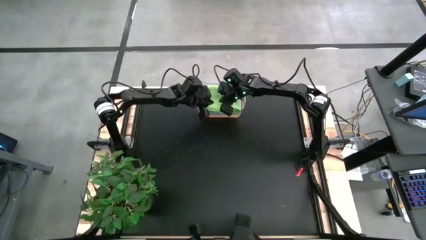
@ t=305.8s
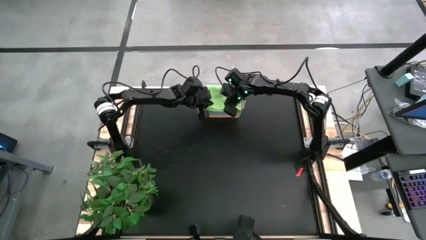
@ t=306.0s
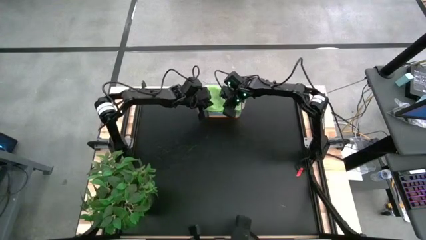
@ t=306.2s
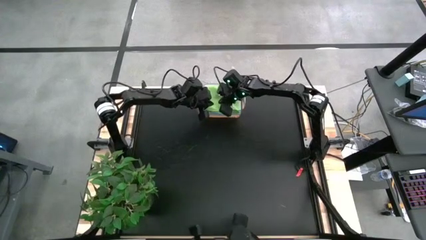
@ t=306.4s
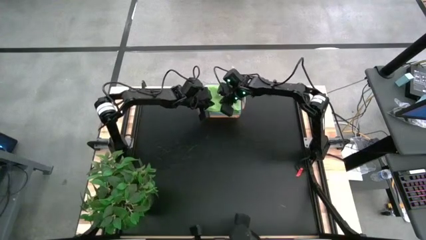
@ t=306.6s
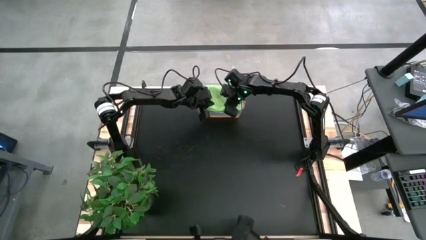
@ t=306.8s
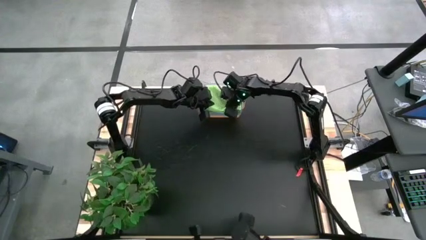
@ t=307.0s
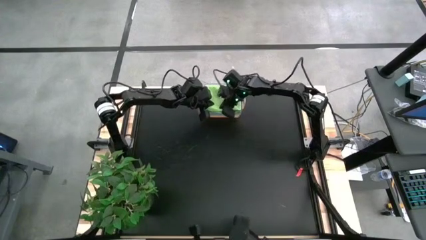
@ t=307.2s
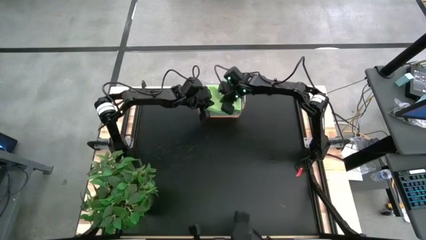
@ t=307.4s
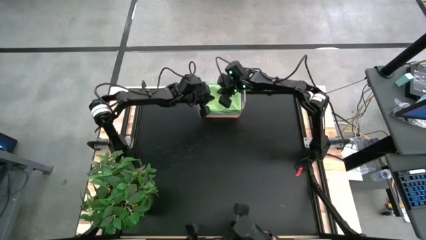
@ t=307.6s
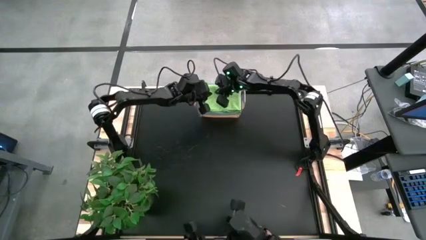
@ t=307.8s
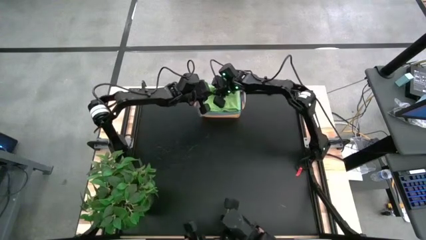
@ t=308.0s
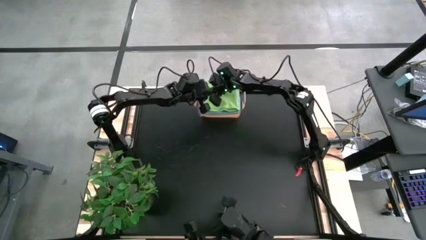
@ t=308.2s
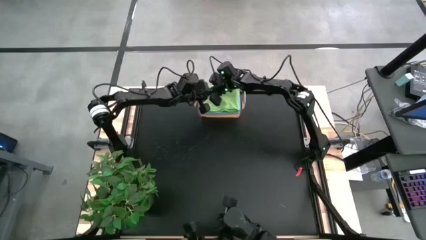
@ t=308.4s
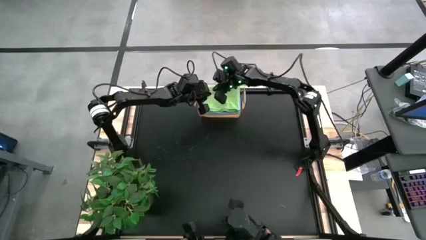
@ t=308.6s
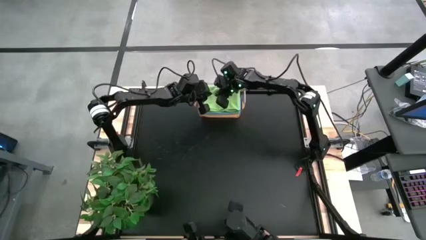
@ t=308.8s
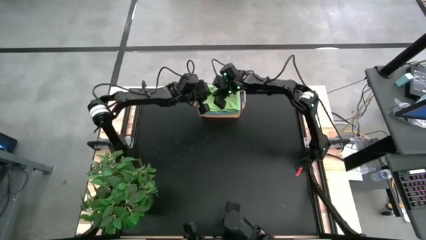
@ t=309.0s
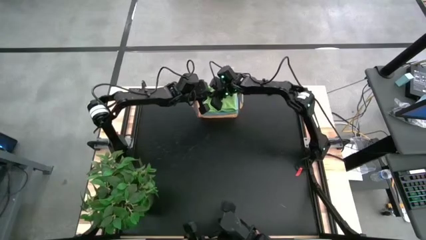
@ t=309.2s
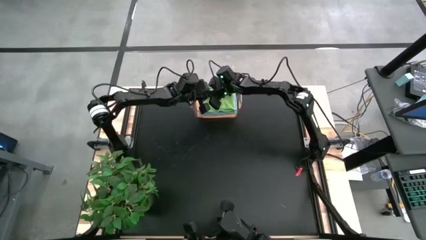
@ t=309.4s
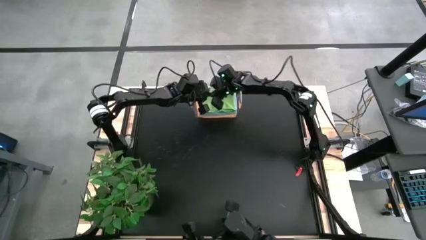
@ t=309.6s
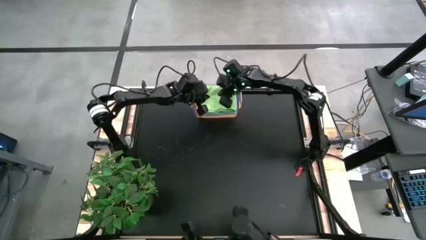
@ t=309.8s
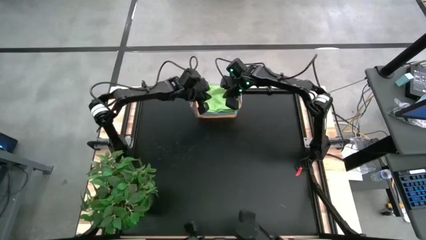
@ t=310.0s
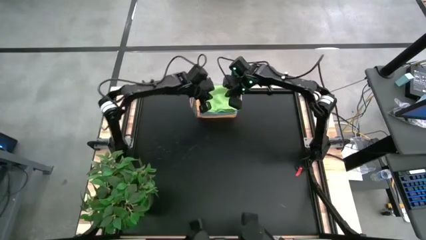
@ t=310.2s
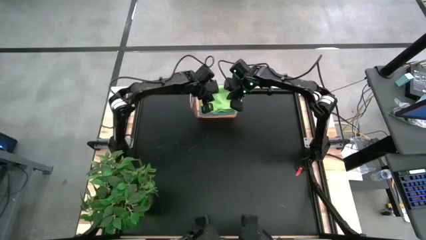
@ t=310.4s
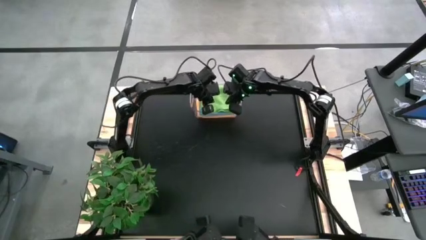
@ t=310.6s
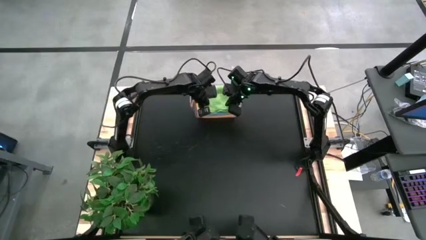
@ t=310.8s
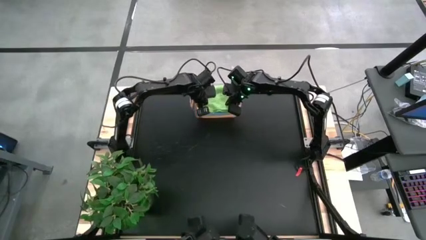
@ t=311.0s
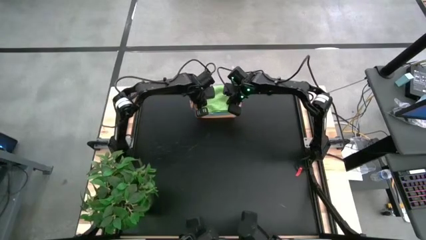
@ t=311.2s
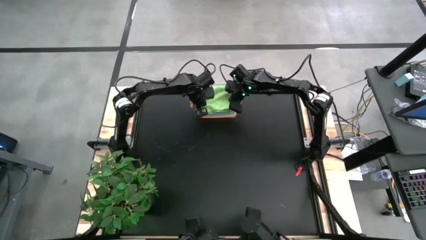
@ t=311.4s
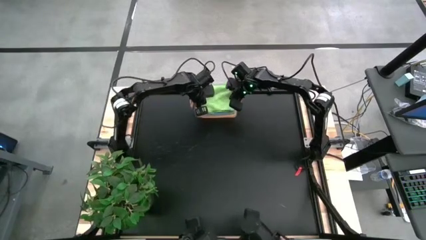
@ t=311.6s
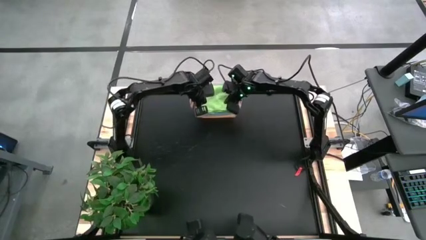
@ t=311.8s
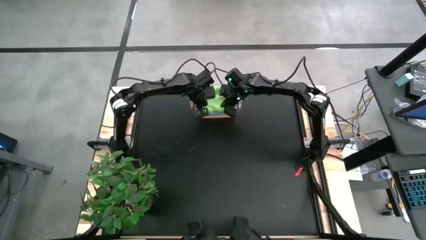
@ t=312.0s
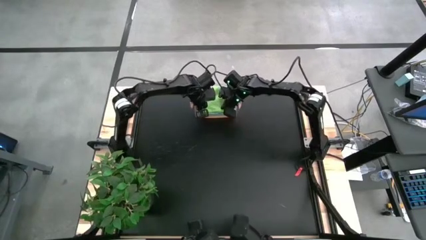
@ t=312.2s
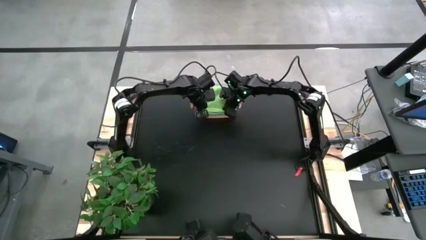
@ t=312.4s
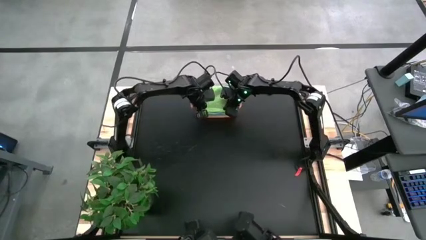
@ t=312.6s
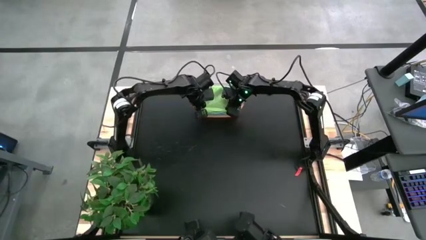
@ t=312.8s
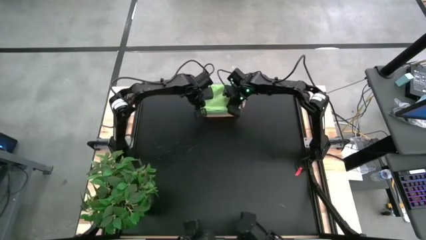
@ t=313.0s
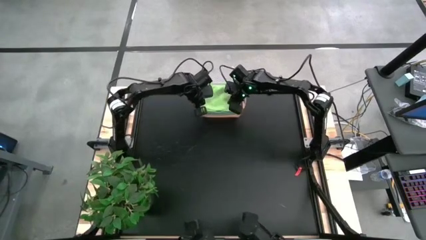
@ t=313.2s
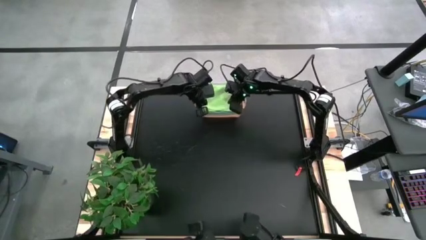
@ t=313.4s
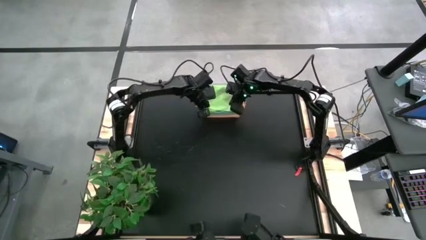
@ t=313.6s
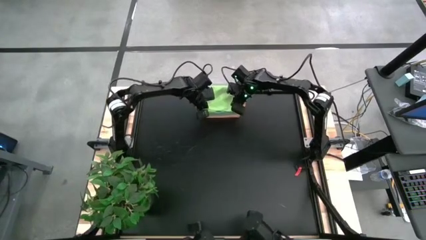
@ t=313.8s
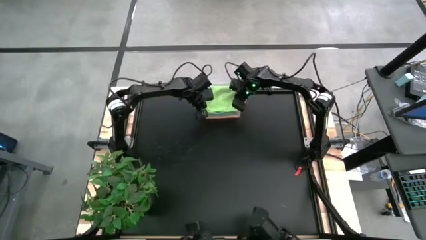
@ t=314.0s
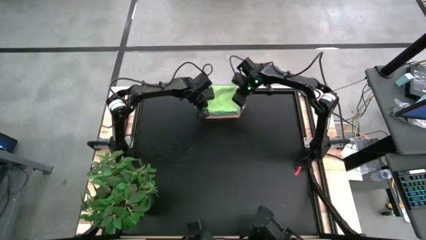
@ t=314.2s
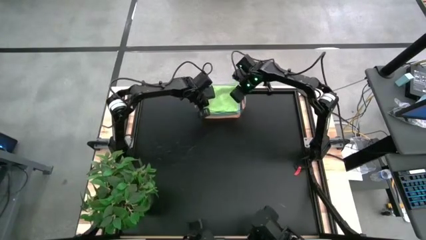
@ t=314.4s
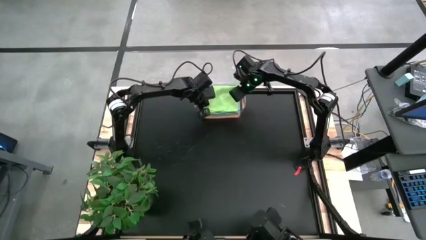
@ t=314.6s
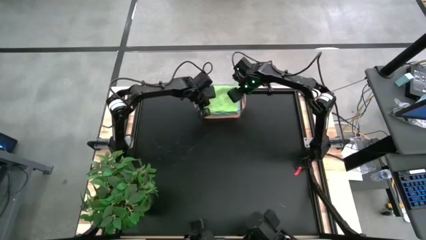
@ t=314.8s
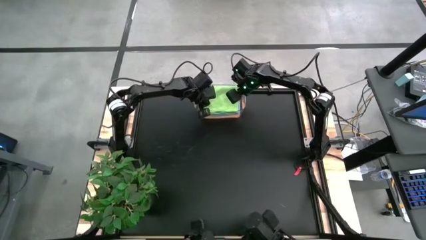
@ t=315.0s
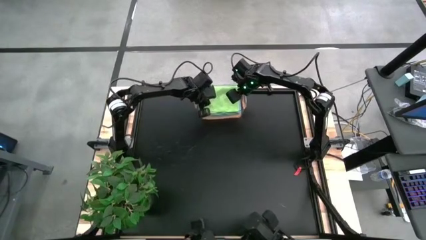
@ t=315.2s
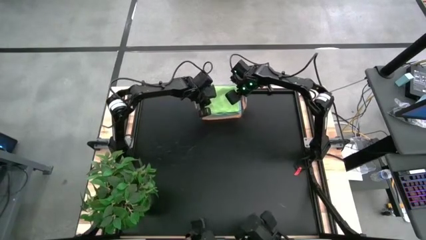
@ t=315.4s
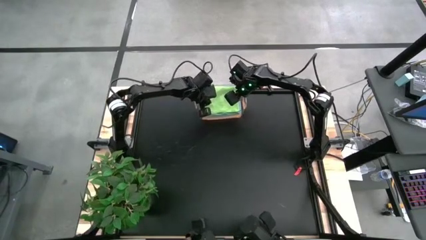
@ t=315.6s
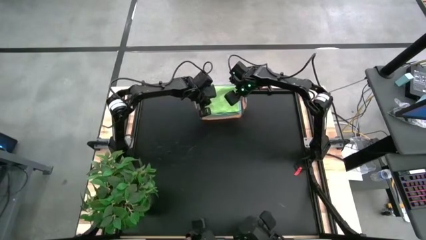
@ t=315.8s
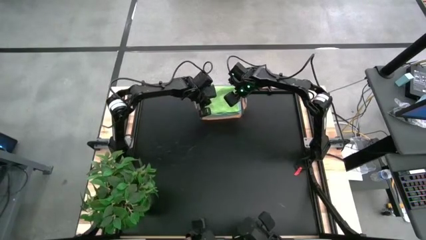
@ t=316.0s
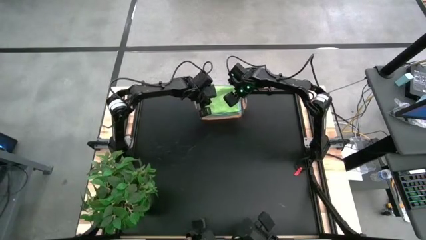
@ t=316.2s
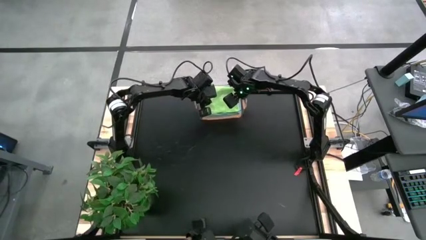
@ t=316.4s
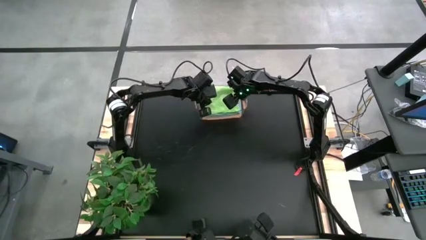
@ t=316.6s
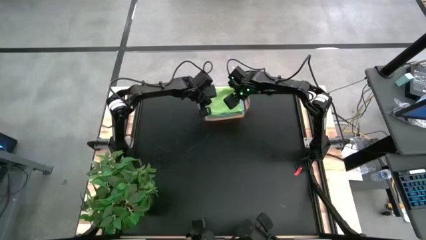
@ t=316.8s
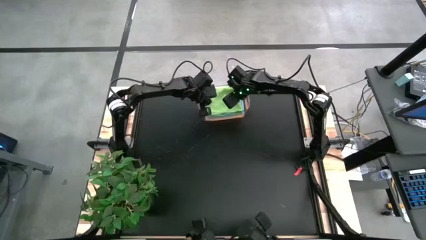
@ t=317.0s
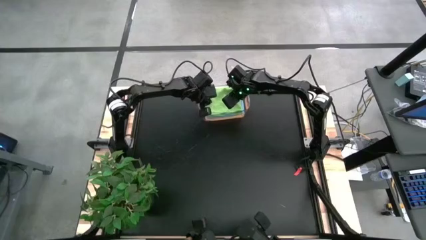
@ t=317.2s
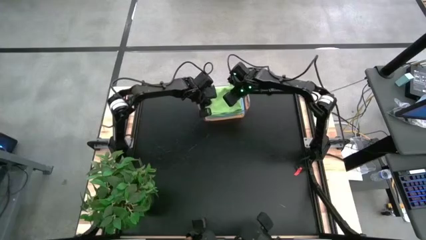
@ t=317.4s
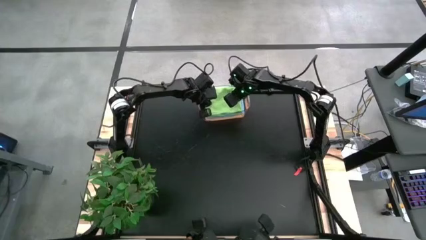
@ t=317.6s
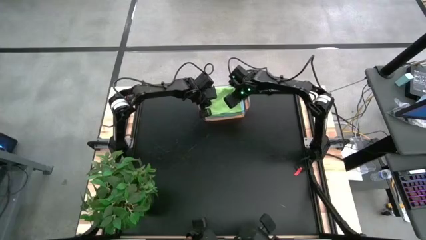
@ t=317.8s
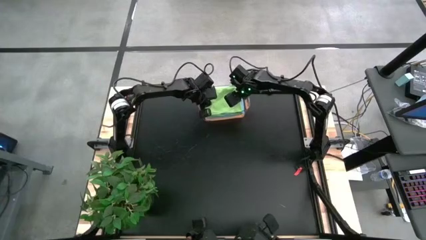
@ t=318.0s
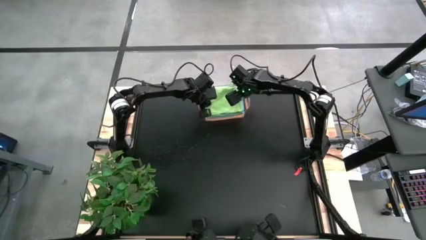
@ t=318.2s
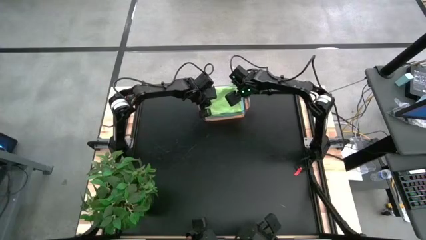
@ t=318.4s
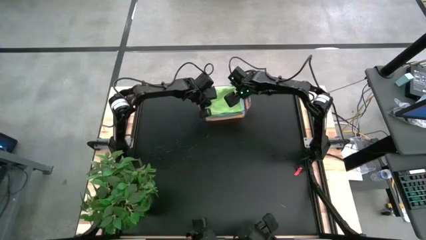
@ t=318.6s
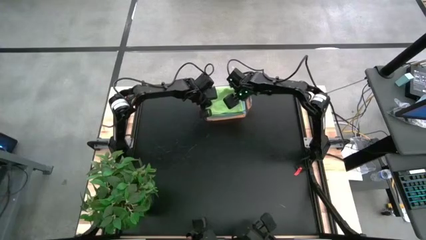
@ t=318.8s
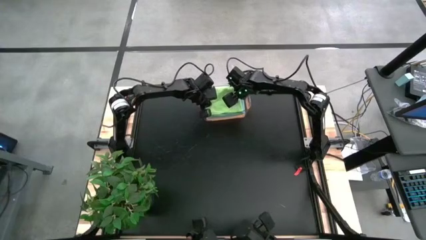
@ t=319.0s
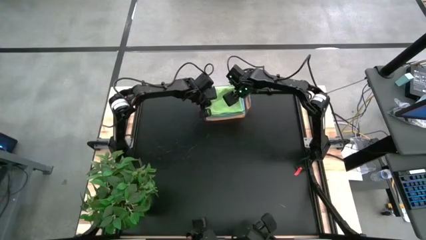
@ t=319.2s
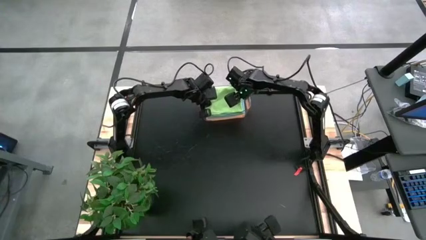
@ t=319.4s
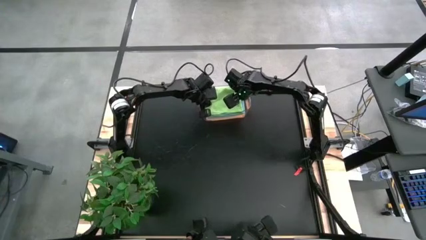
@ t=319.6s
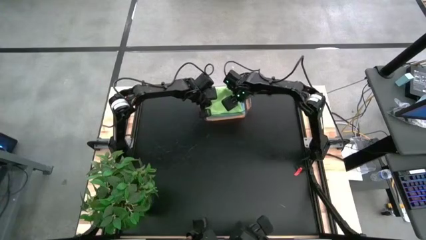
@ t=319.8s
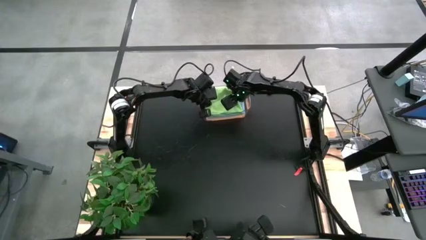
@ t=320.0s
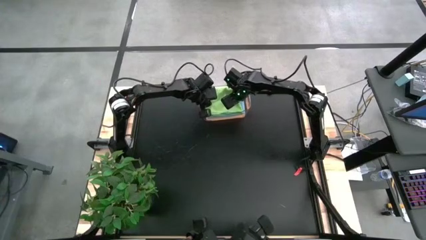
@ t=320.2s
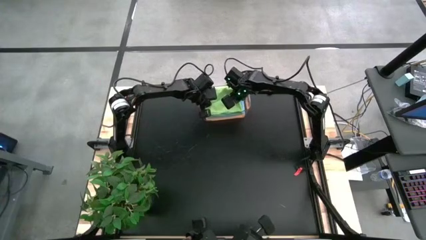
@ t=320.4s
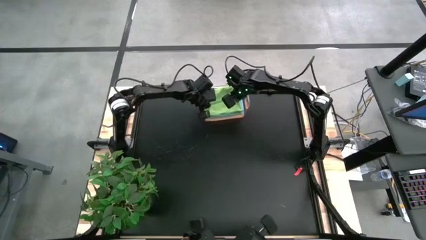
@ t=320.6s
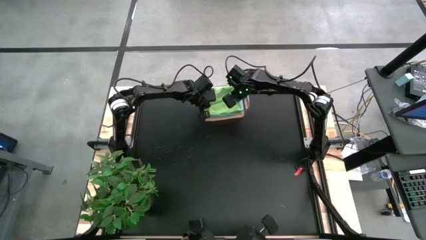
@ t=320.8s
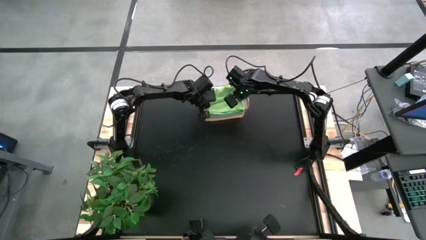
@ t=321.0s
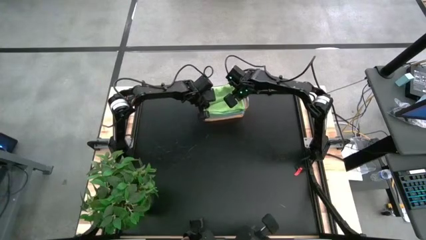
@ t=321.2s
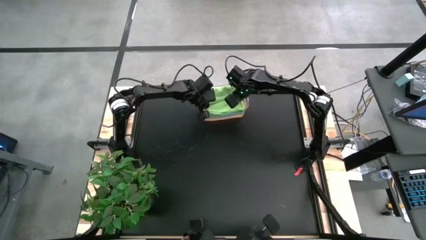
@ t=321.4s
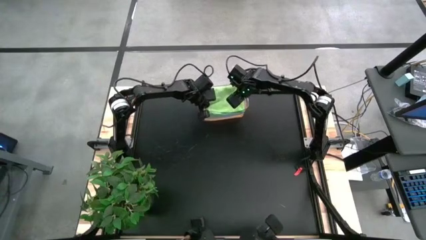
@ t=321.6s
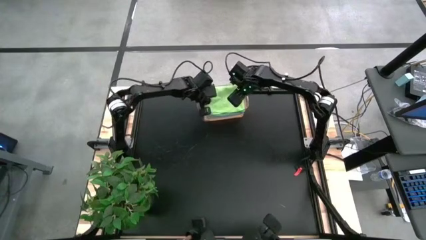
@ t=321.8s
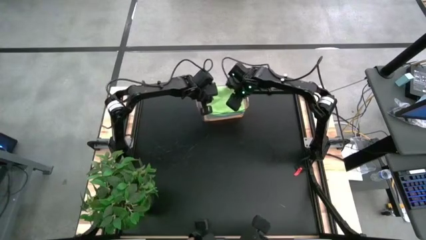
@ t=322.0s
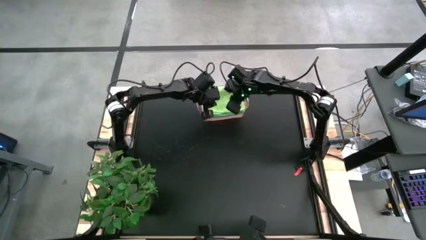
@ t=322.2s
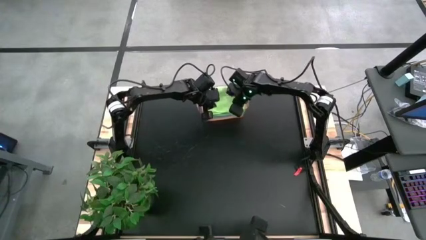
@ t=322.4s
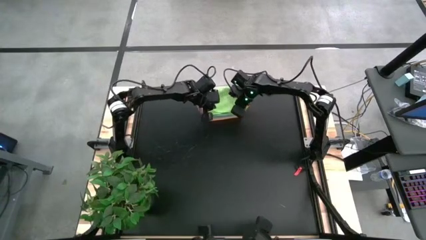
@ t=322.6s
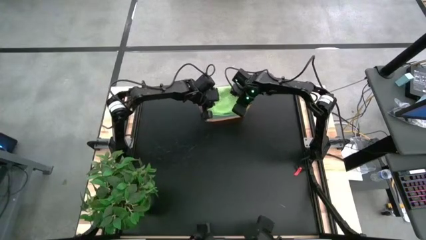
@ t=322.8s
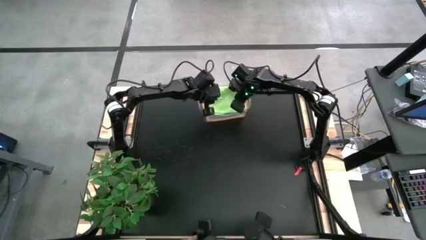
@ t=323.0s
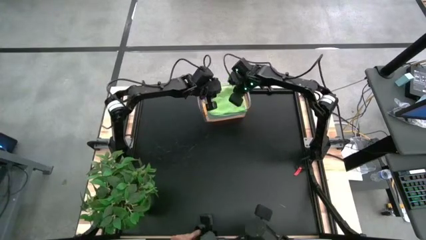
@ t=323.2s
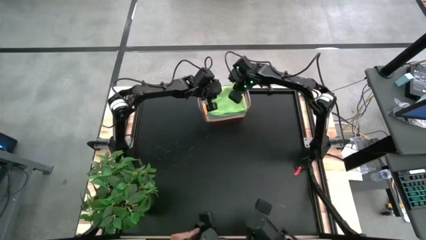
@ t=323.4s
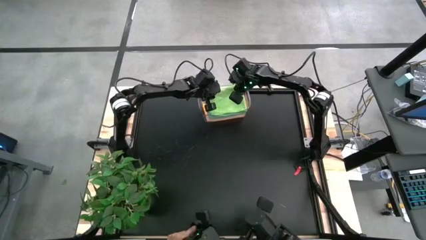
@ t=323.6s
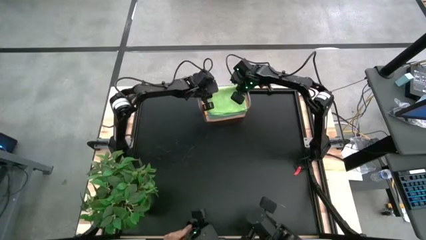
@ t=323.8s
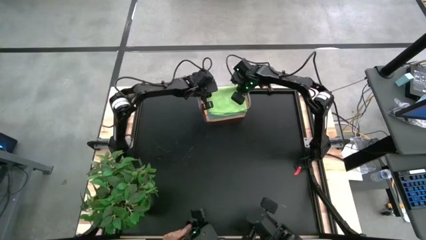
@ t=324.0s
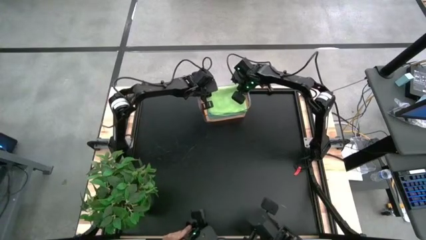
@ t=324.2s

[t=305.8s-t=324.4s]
Task: Fold microfiber towels
Put the green microfiber cloth into the transparent bin
